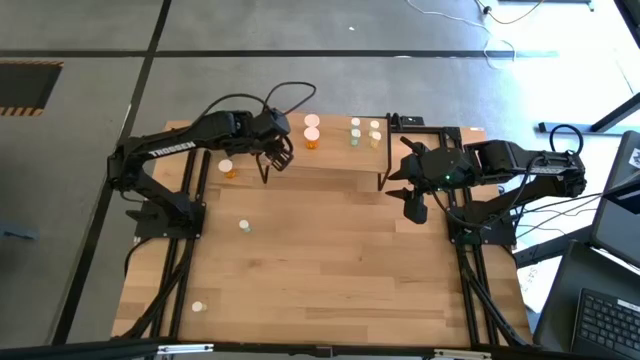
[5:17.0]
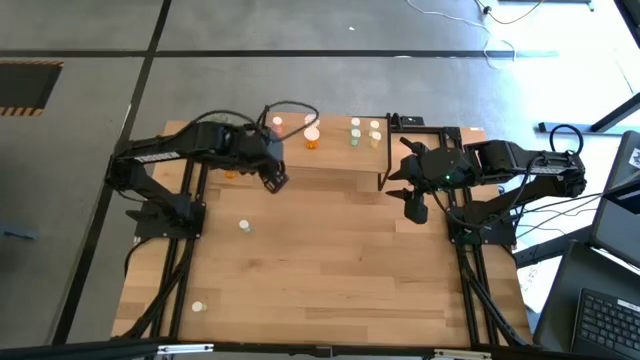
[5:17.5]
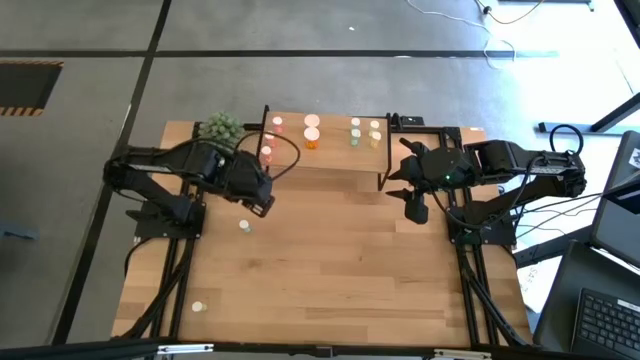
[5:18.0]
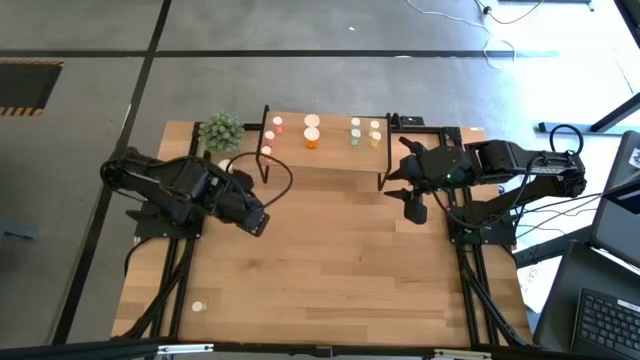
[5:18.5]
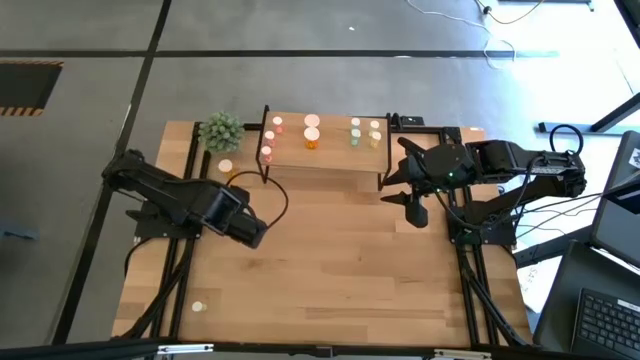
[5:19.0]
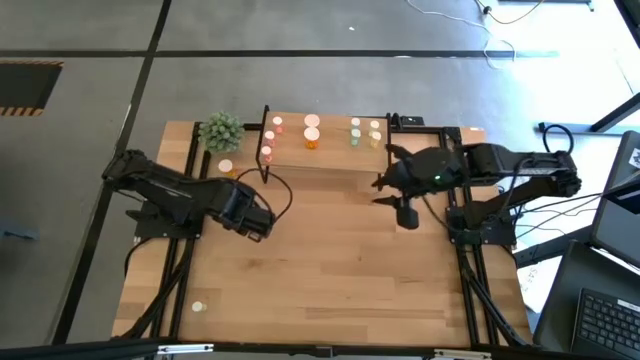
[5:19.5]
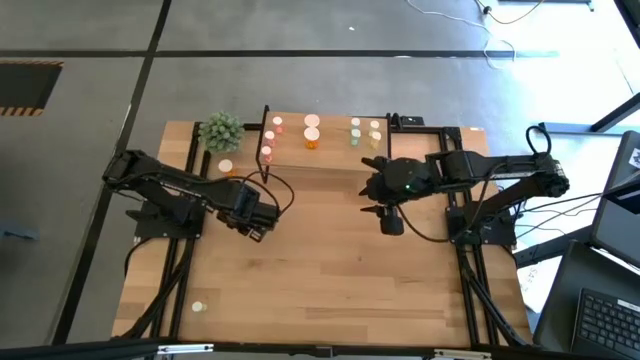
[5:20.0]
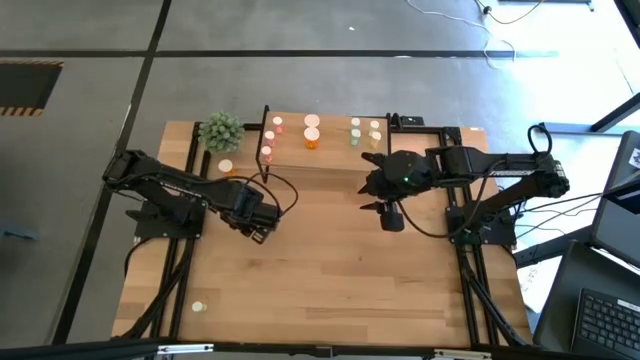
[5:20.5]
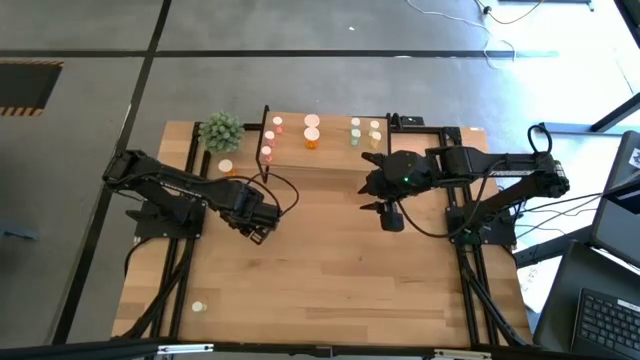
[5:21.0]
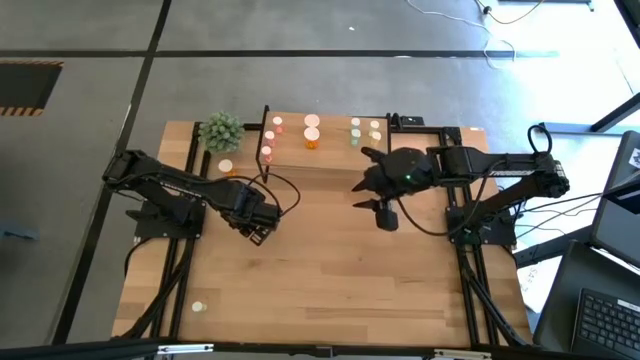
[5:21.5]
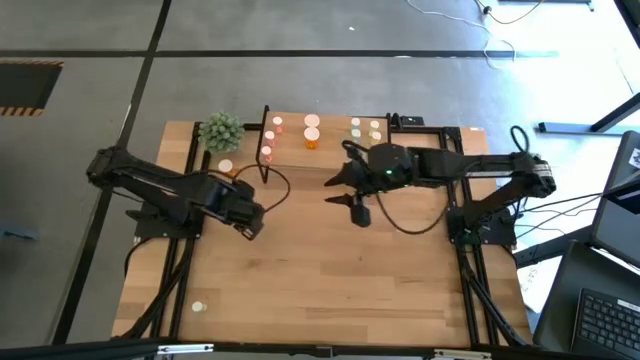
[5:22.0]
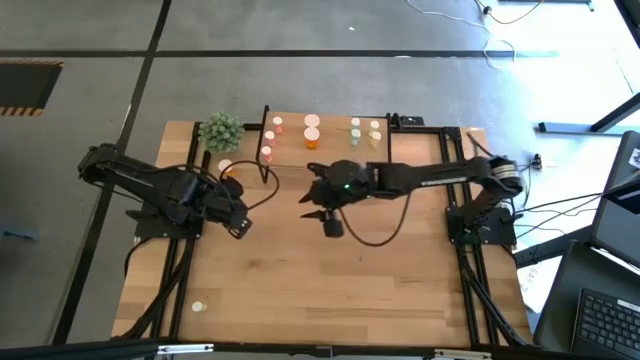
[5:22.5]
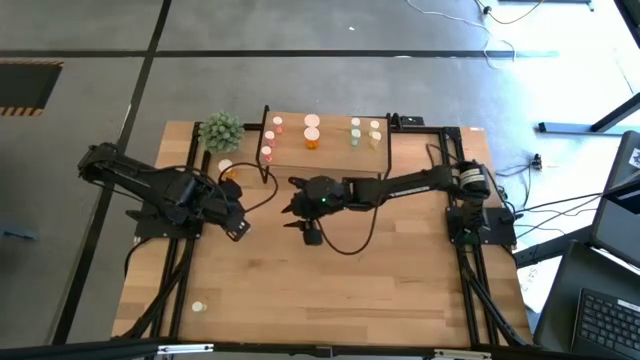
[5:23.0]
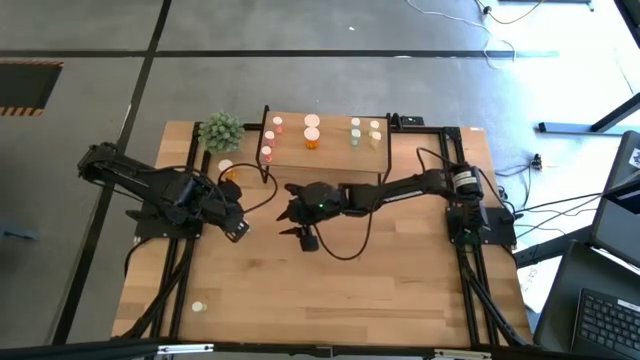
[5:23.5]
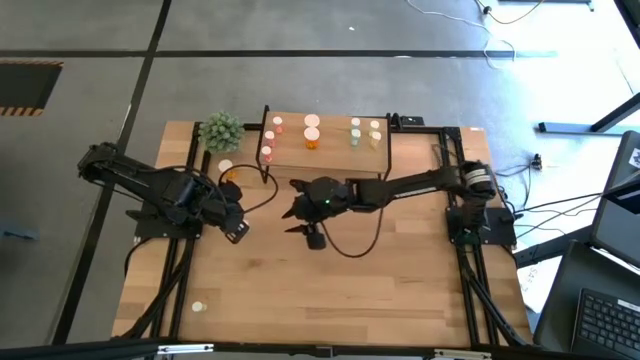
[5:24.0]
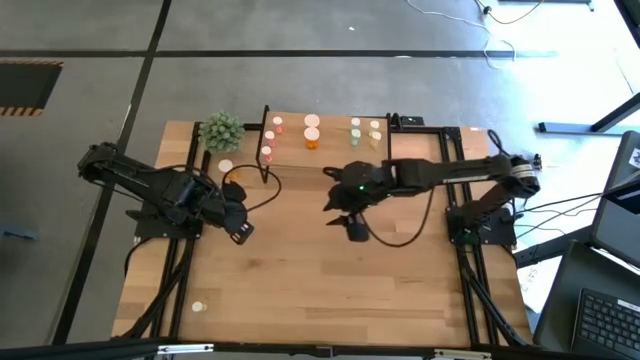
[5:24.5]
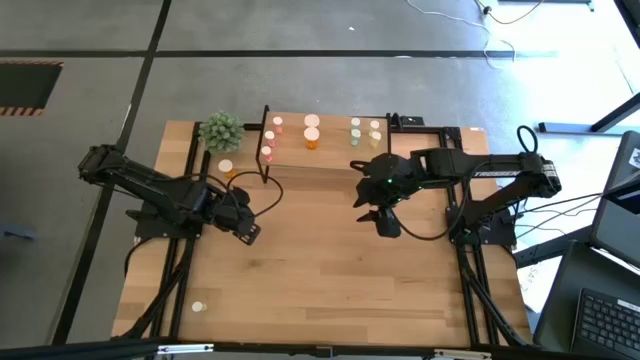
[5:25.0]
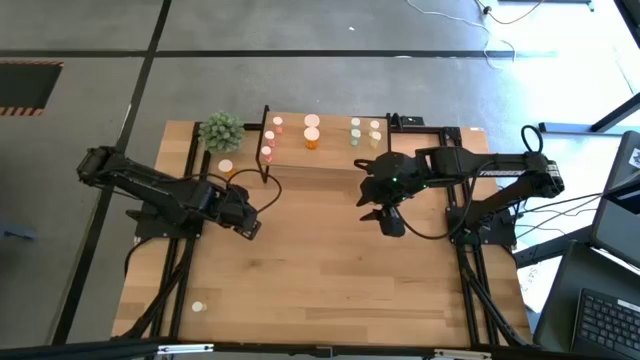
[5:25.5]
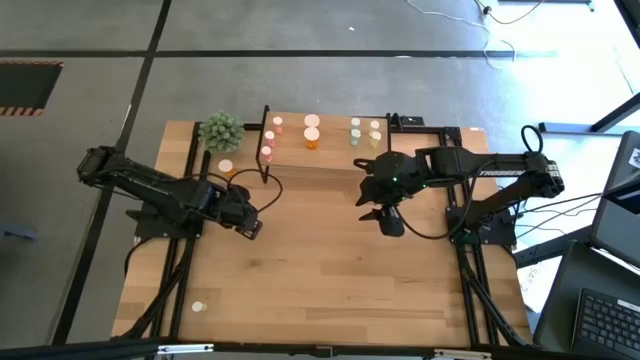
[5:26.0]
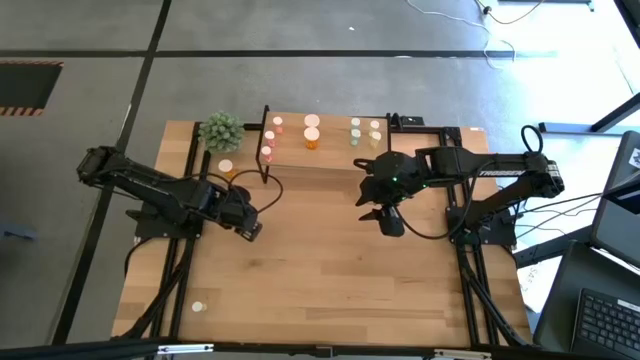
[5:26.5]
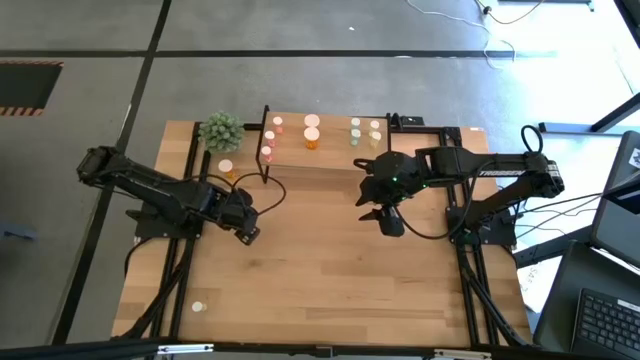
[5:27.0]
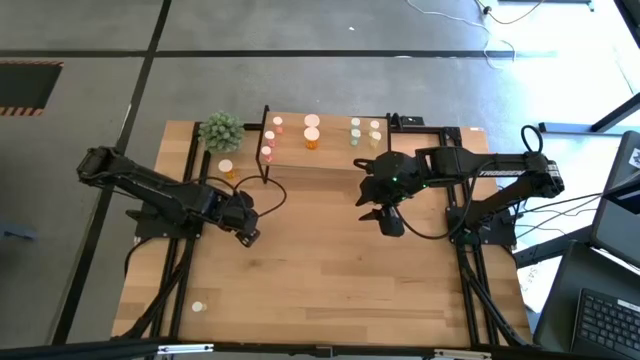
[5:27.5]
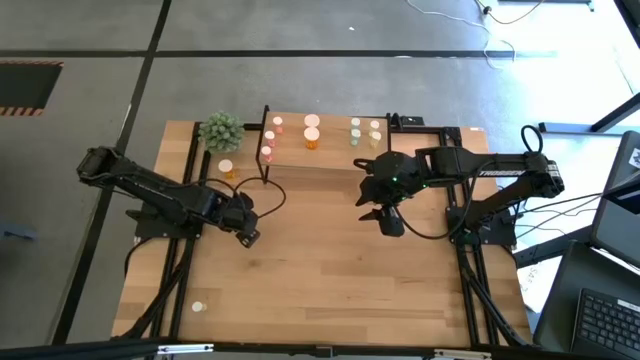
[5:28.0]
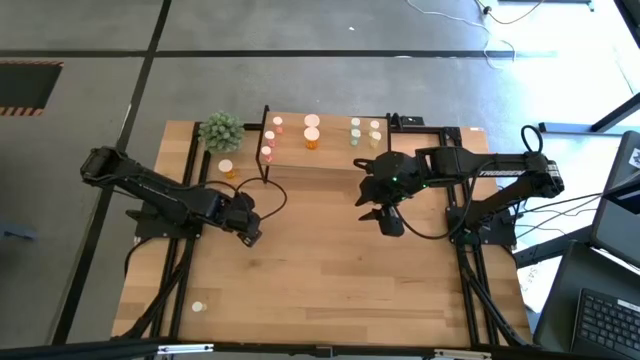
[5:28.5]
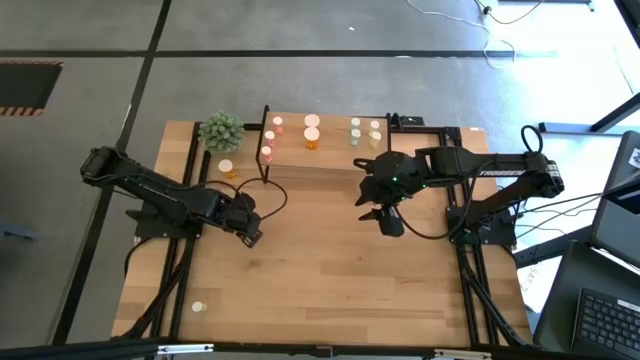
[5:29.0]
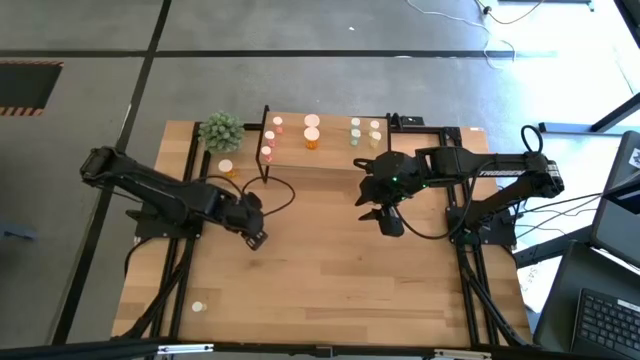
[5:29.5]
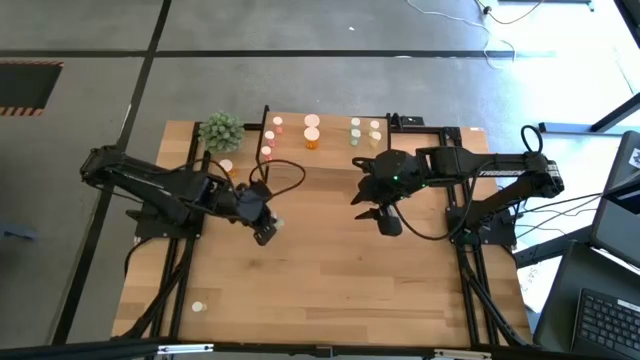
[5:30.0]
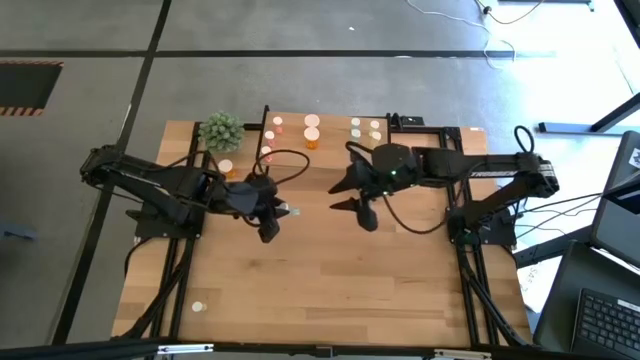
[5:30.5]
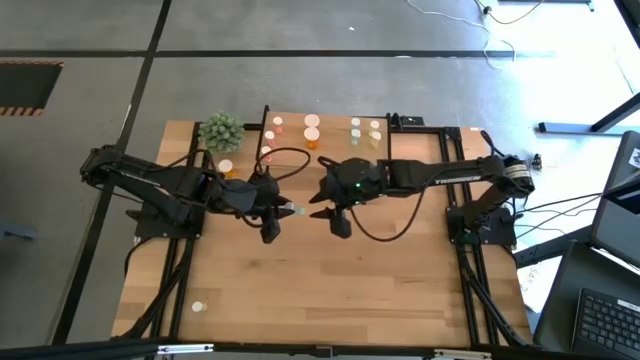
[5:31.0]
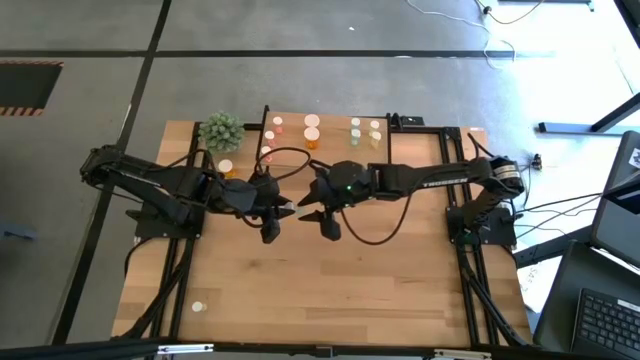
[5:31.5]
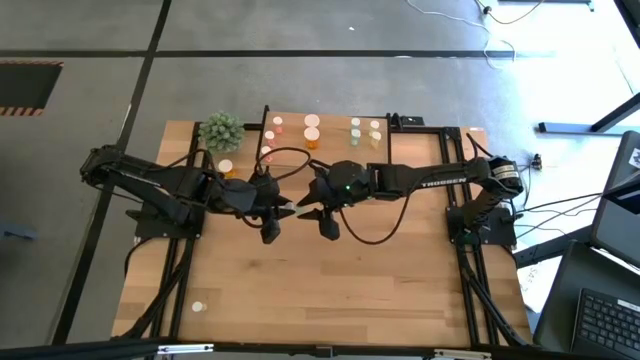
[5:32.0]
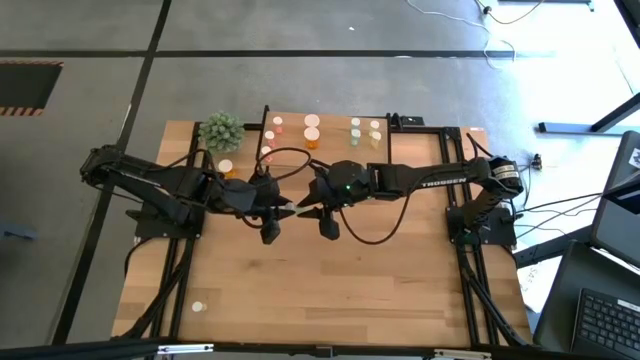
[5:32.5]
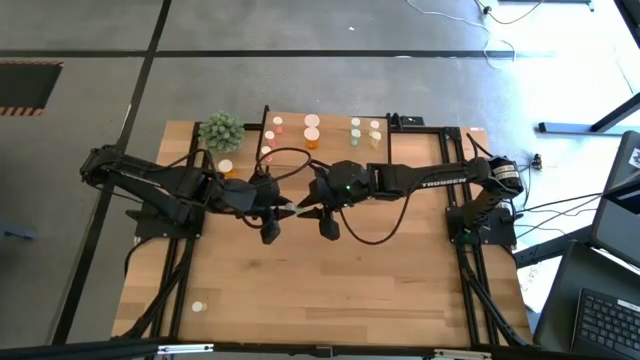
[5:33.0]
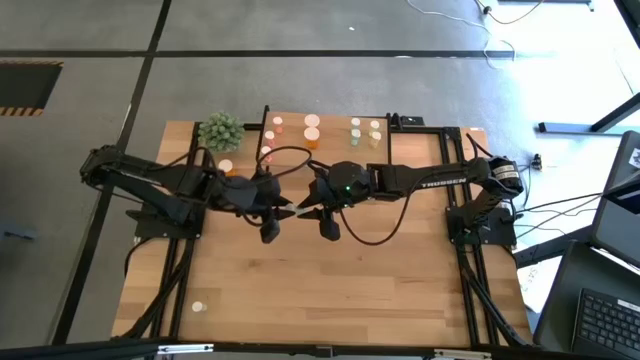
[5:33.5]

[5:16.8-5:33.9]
Task: Pick and place medicine bottles onto shelf by color
Put the blue medicine bottle on the shelf, aligned with the other blue medicine bottle
